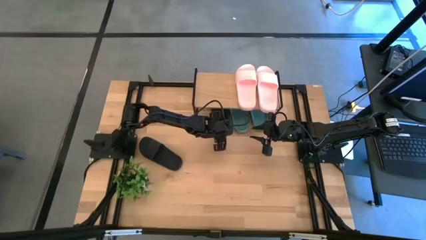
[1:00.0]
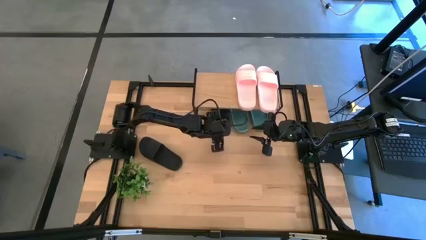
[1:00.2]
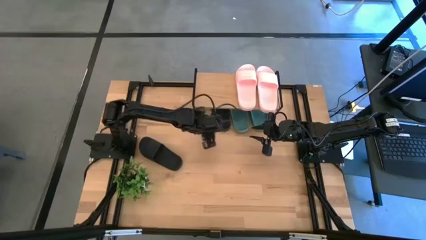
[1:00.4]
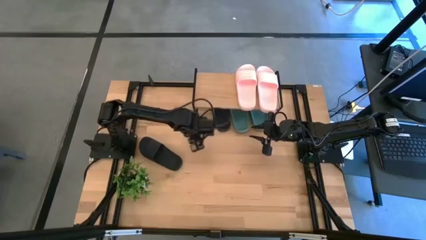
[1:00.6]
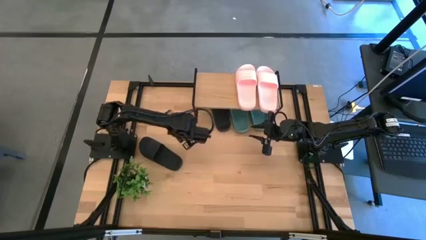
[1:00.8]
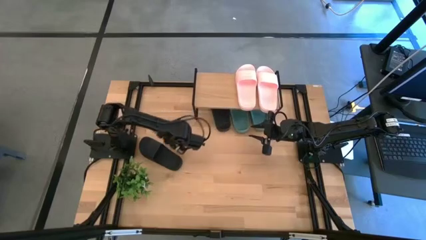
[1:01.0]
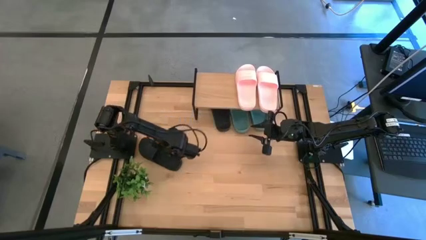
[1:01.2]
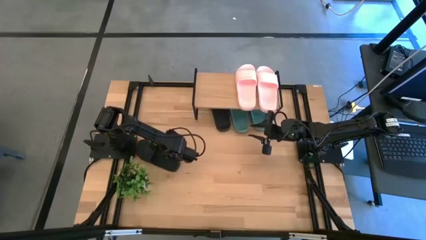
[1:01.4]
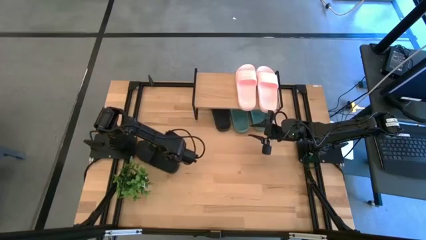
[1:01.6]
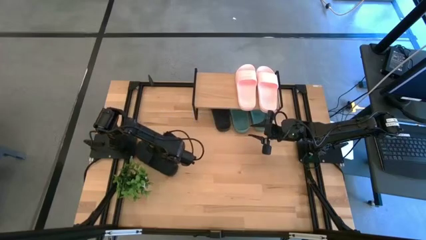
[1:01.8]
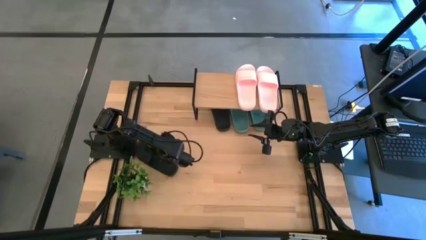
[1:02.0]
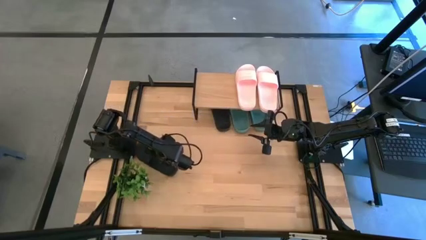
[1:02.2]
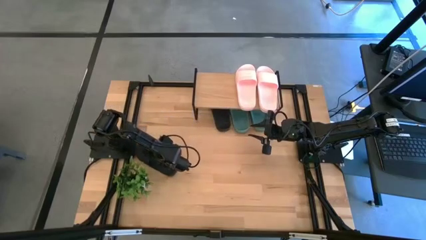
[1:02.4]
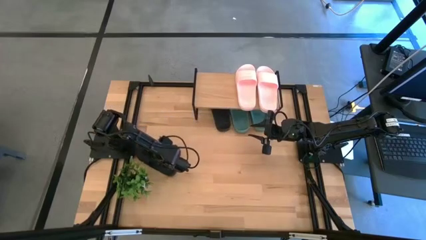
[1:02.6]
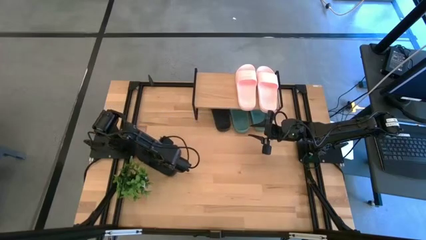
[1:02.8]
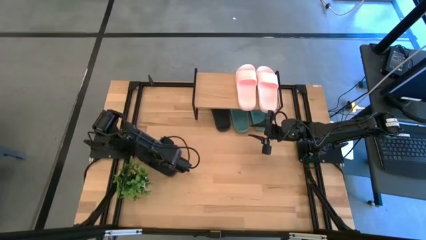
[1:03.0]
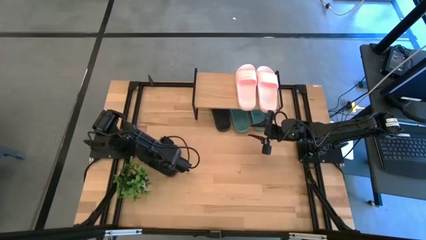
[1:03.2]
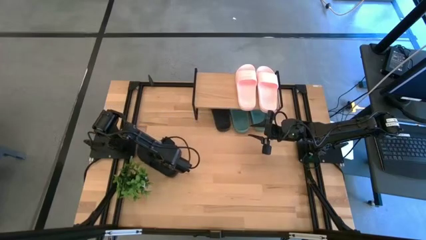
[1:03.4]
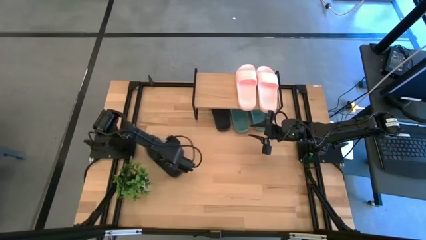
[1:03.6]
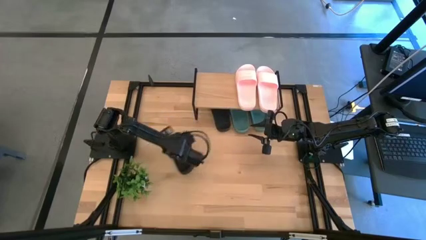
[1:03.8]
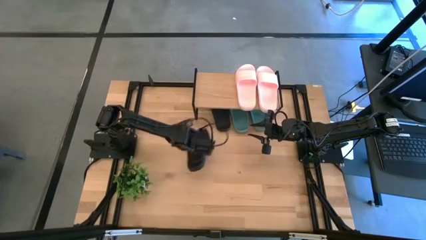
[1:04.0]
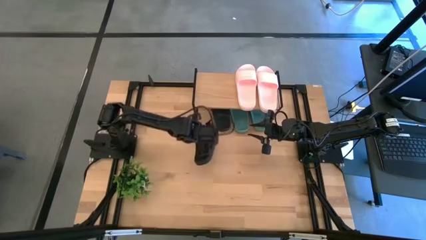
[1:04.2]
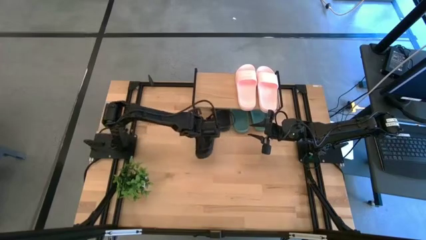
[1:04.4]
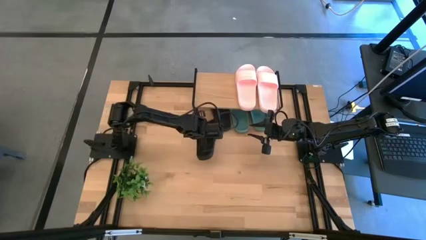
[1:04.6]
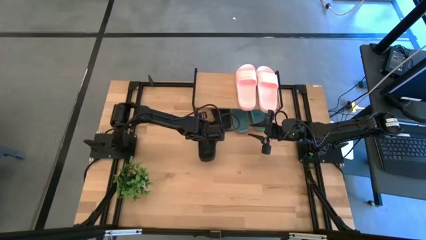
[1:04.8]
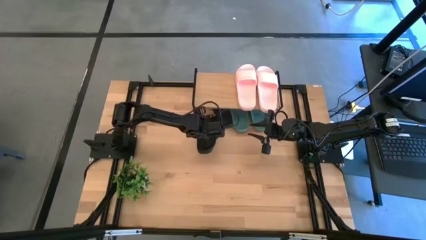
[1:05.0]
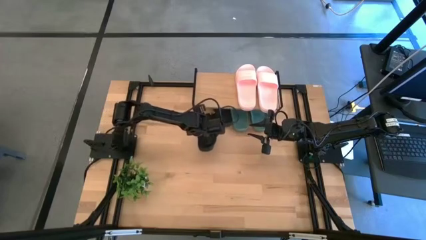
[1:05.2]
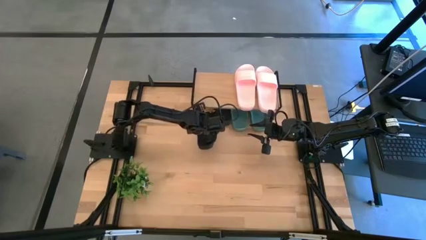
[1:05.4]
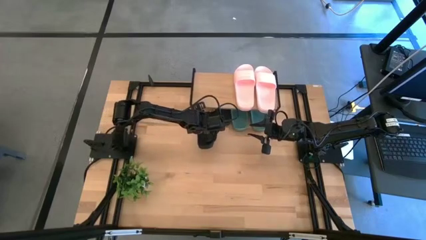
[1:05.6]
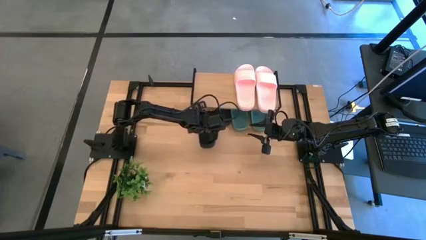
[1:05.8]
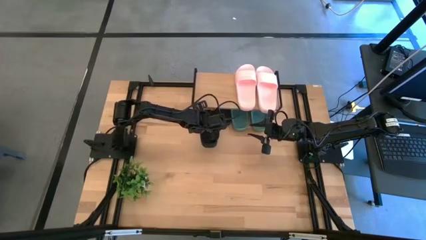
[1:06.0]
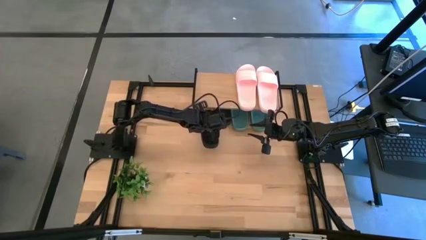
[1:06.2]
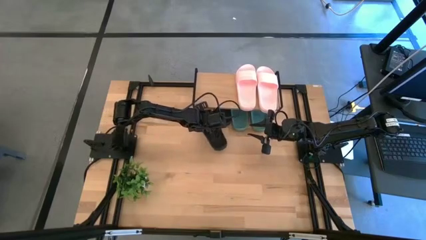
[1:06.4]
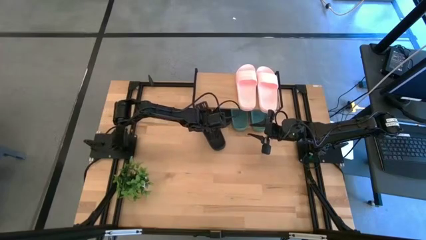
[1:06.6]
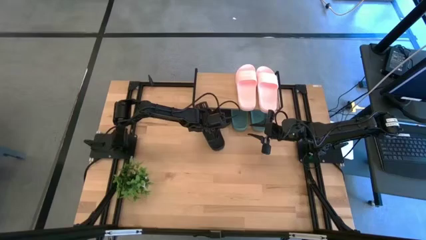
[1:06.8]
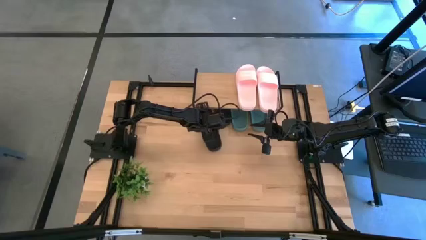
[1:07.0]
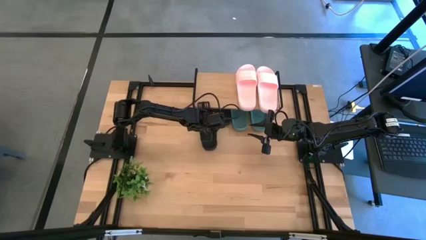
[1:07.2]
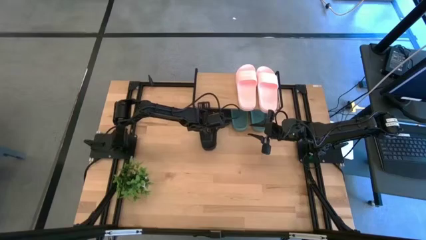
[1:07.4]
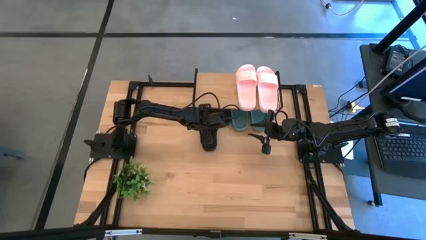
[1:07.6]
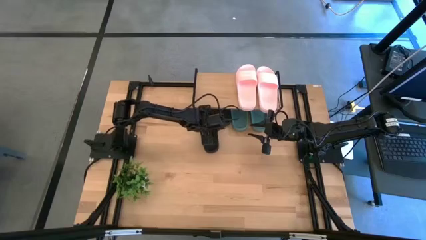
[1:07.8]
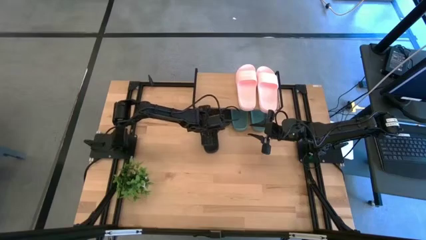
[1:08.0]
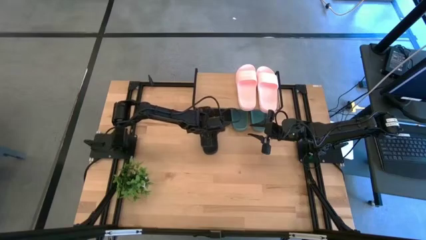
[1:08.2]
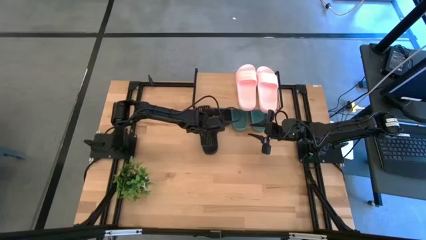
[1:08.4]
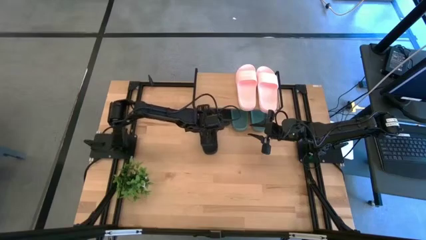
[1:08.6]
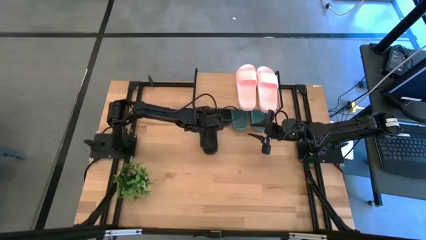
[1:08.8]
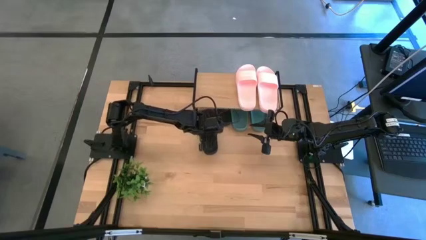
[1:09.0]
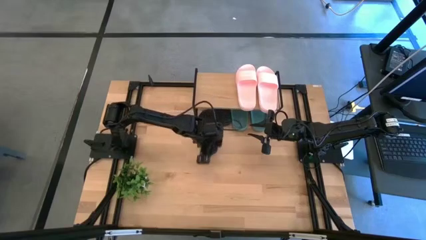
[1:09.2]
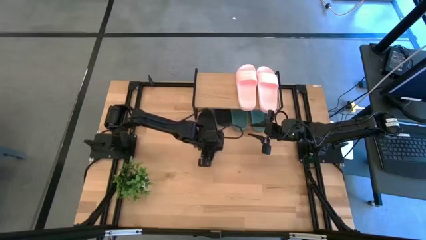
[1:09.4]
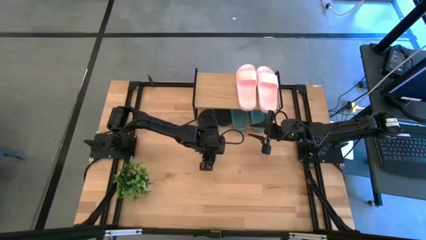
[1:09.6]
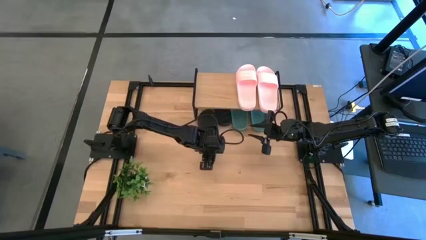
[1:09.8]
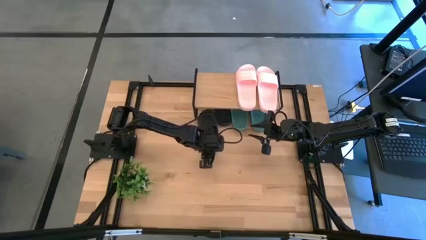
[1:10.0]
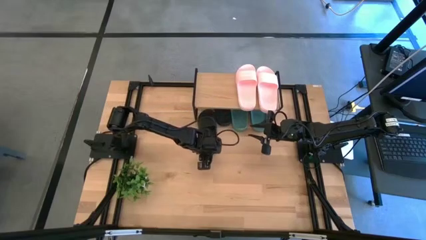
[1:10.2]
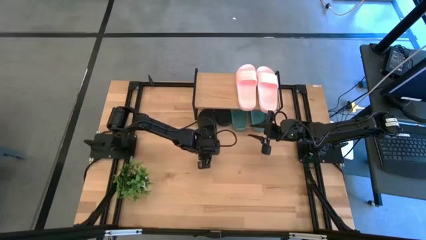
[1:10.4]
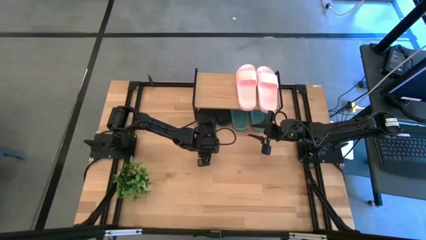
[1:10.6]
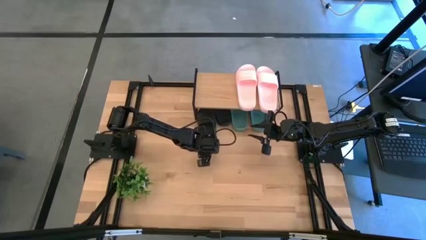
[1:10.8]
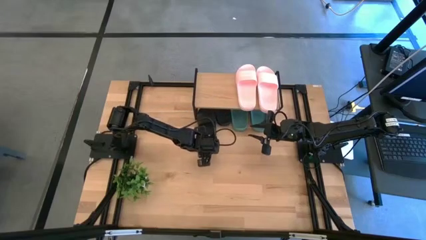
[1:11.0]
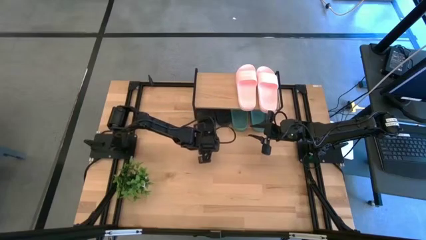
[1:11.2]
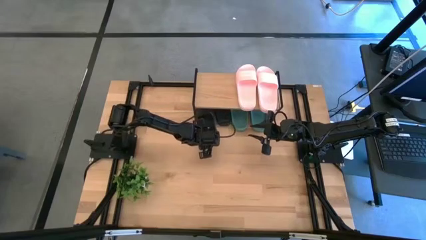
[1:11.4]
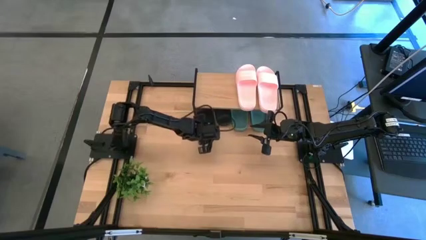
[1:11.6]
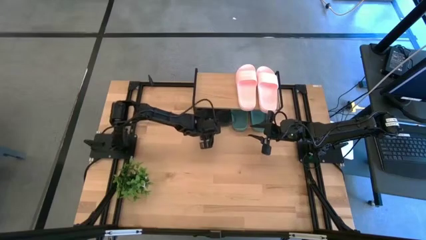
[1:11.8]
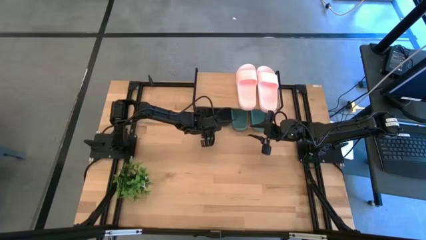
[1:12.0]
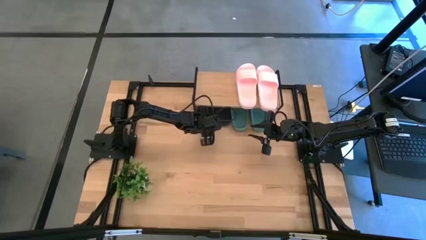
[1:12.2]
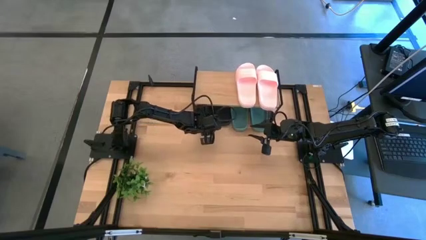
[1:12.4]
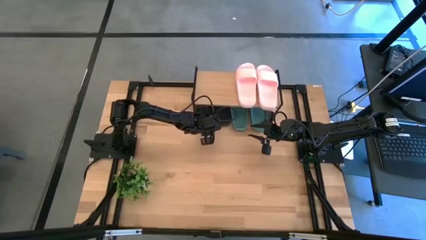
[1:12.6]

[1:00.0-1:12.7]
Task: Pick and place slides into the shelf
Put the black slide under the shelf

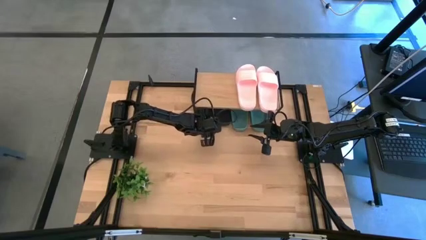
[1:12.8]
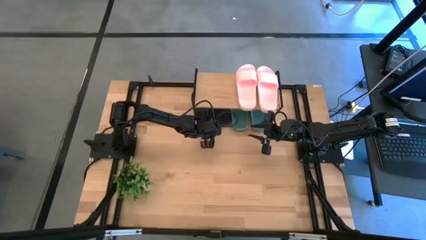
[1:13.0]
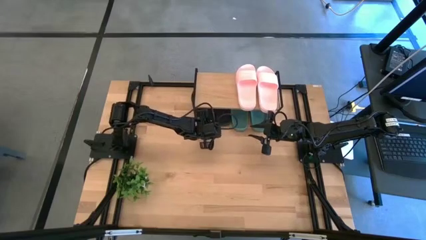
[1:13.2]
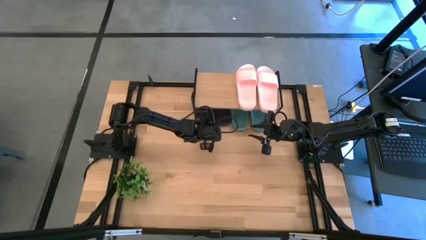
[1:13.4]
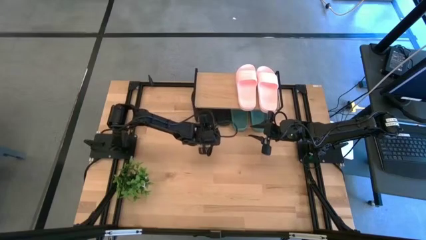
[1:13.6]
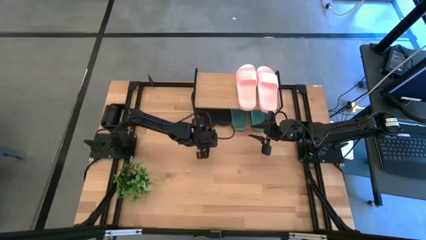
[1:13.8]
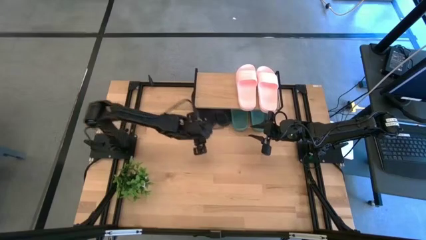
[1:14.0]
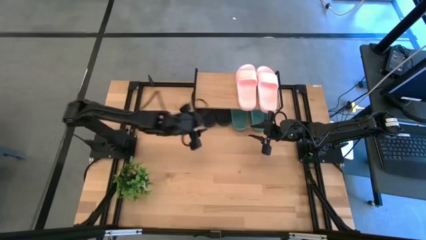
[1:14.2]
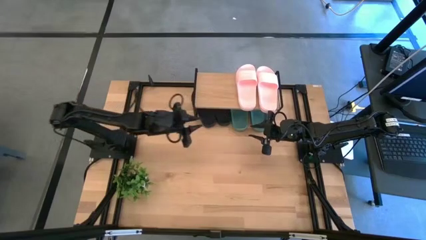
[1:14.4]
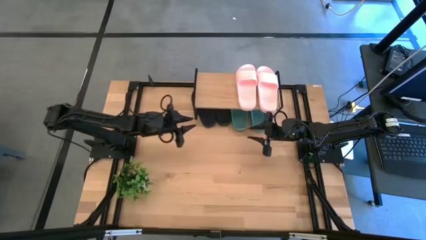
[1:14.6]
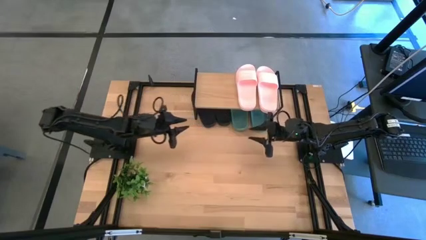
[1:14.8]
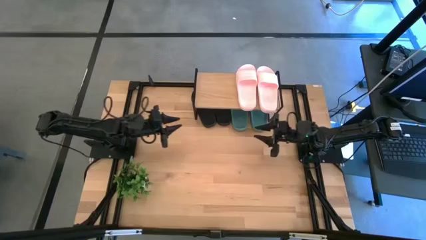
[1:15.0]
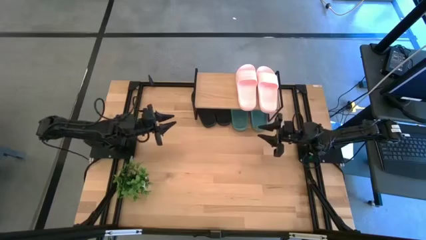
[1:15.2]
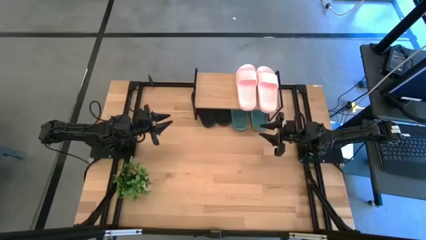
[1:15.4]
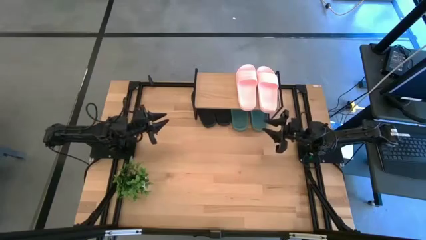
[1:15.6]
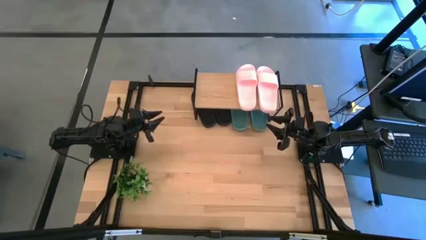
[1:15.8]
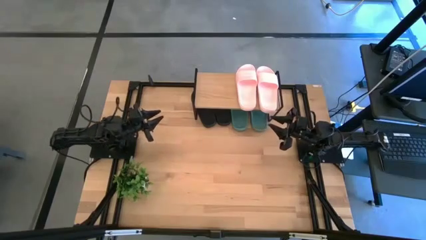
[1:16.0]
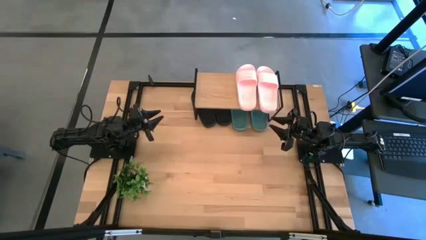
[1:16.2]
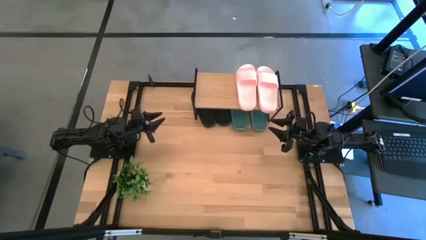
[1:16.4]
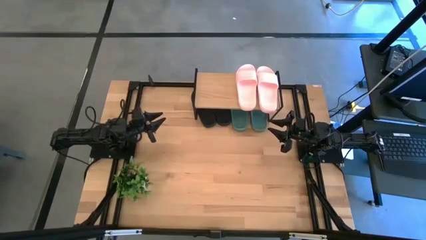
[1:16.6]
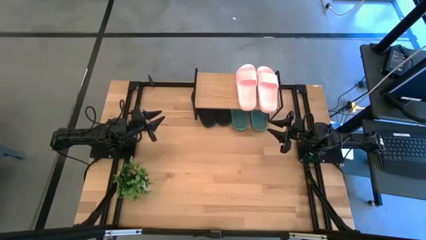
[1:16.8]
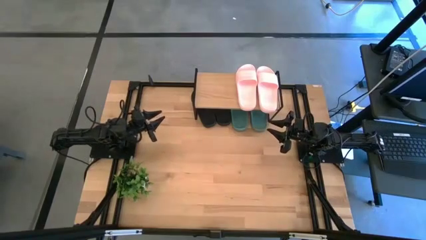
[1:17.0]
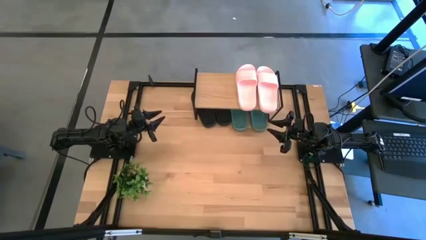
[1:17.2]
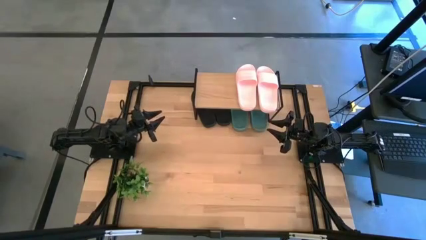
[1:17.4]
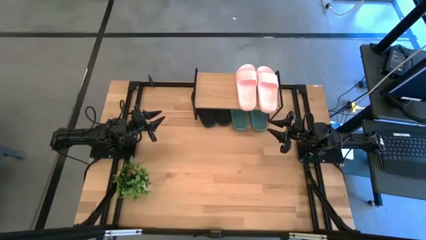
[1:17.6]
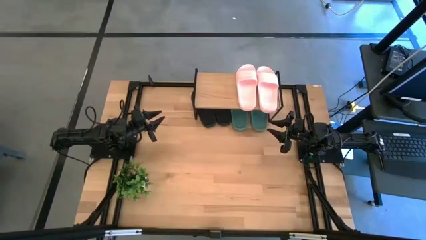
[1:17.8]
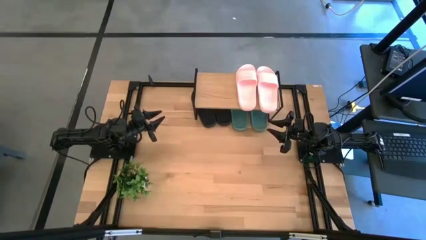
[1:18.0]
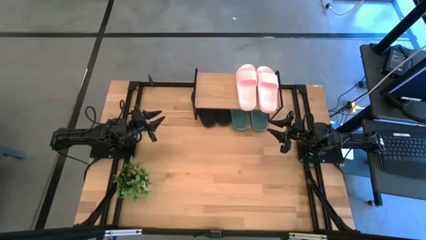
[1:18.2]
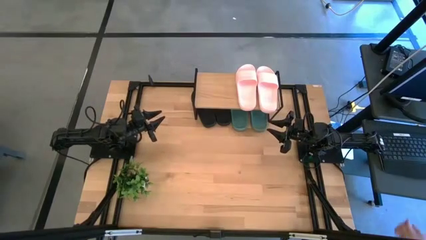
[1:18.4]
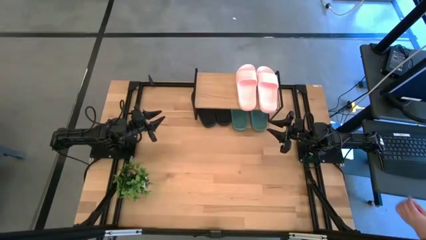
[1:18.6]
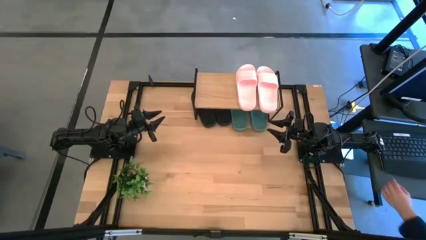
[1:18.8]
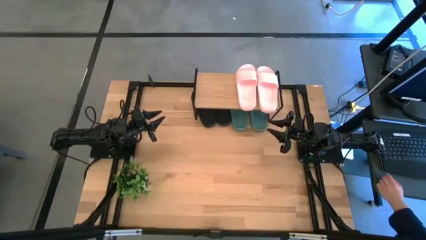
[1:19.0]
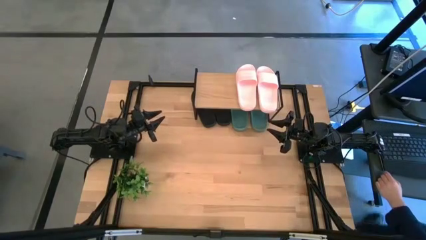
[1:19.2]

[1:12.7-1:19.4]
Return to Home Position
